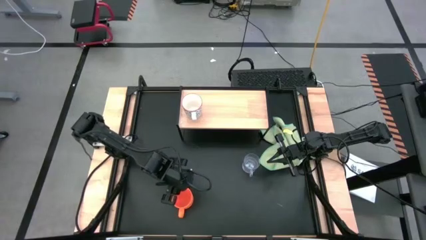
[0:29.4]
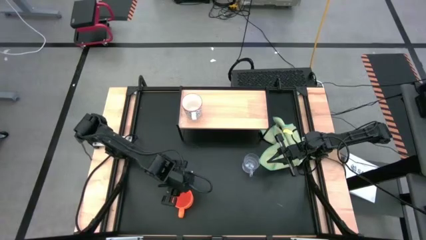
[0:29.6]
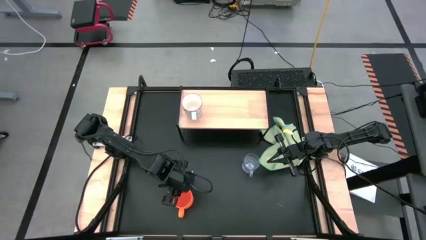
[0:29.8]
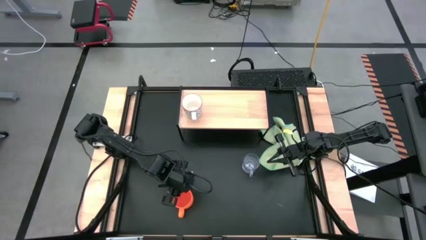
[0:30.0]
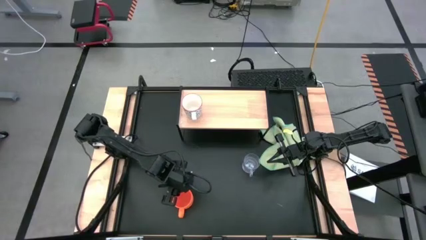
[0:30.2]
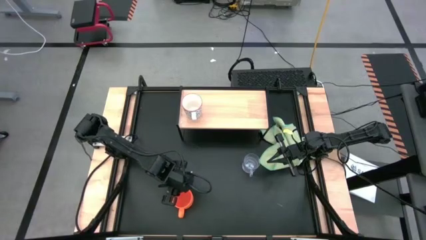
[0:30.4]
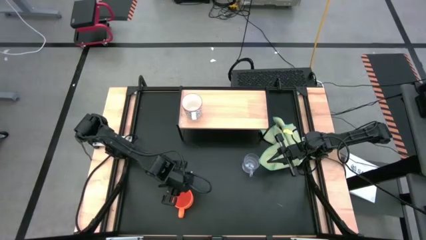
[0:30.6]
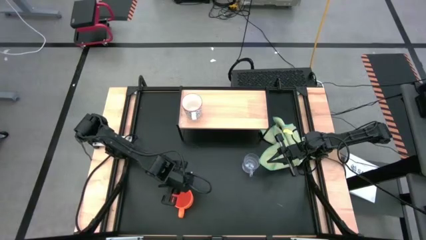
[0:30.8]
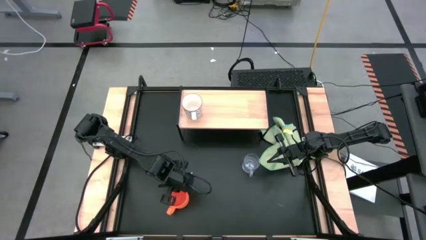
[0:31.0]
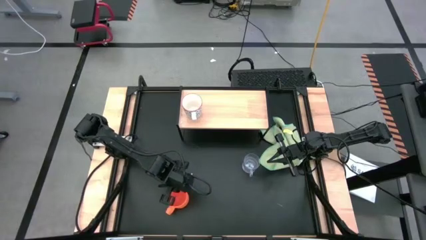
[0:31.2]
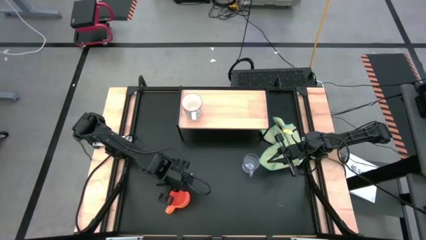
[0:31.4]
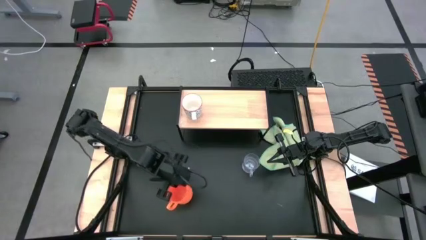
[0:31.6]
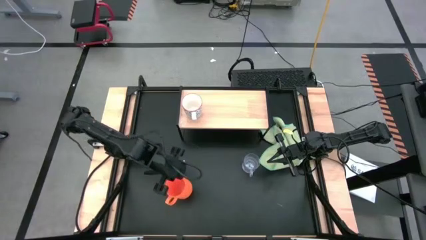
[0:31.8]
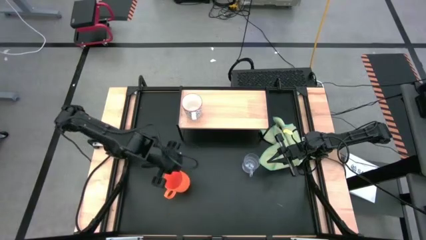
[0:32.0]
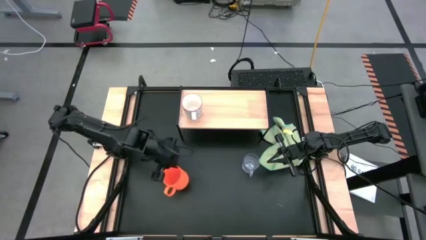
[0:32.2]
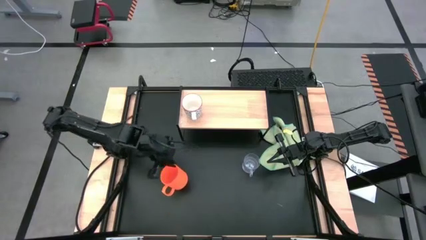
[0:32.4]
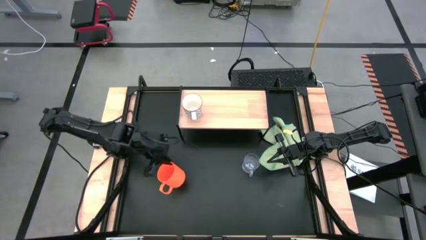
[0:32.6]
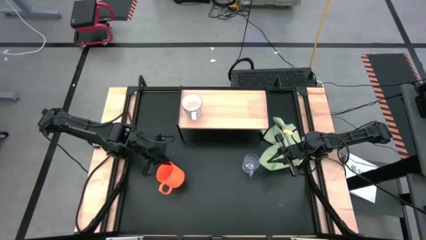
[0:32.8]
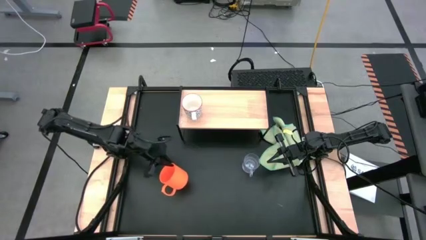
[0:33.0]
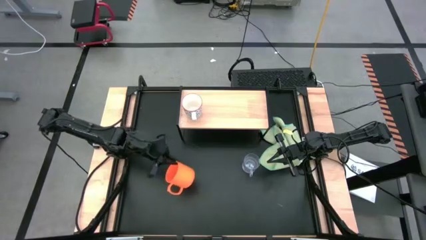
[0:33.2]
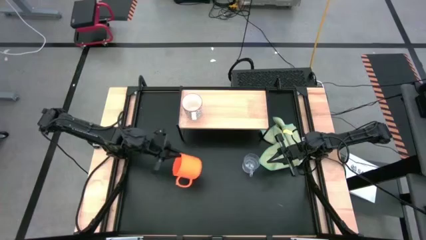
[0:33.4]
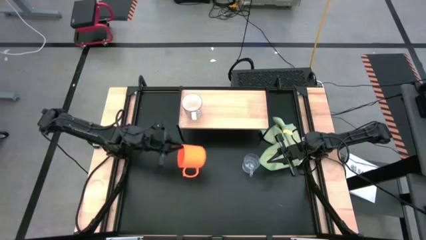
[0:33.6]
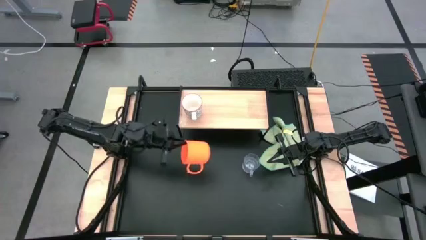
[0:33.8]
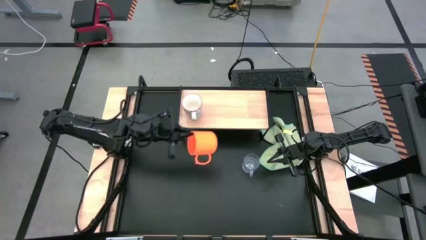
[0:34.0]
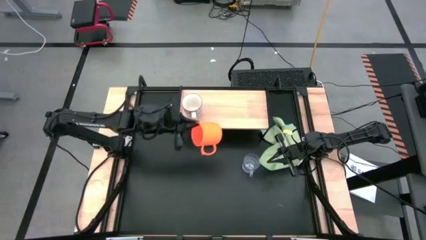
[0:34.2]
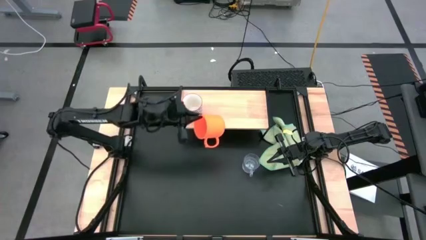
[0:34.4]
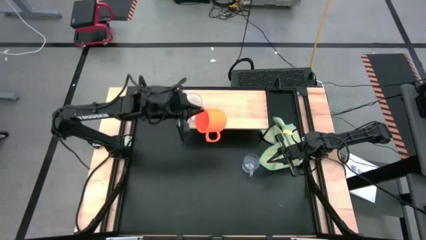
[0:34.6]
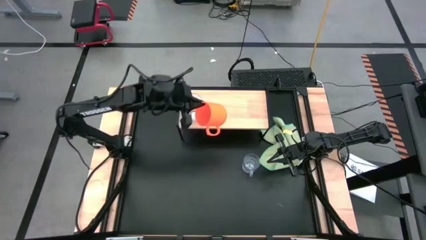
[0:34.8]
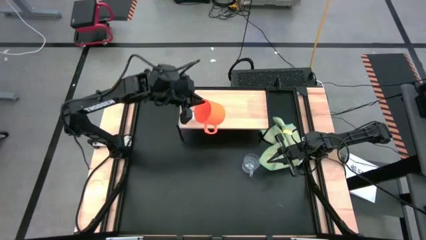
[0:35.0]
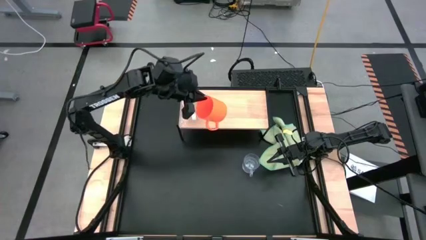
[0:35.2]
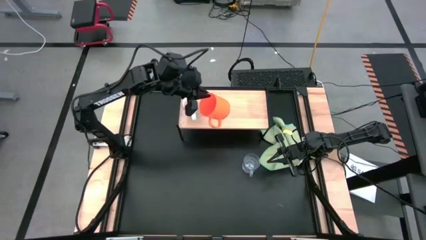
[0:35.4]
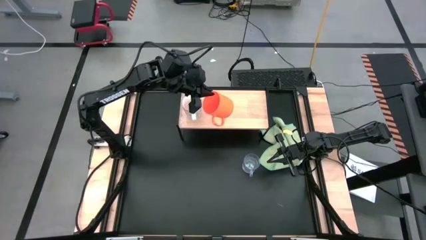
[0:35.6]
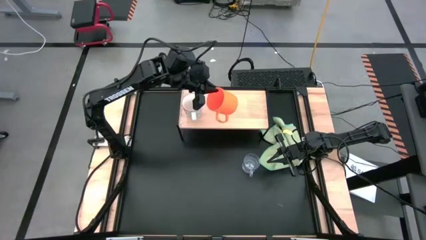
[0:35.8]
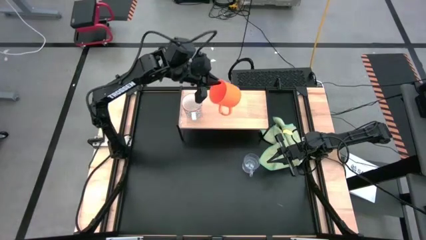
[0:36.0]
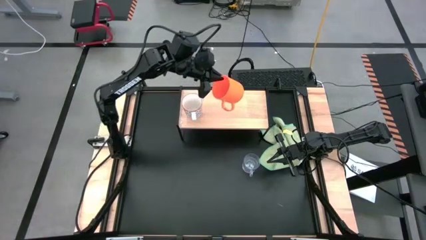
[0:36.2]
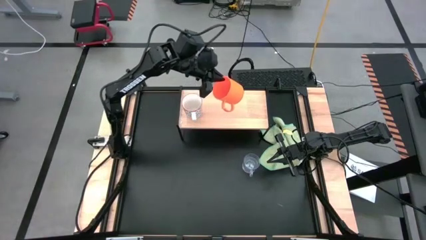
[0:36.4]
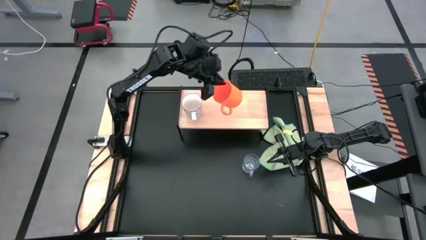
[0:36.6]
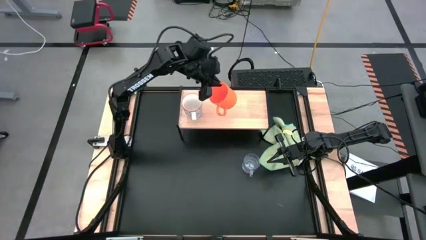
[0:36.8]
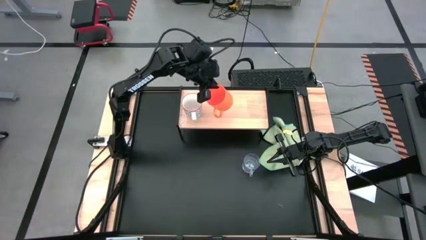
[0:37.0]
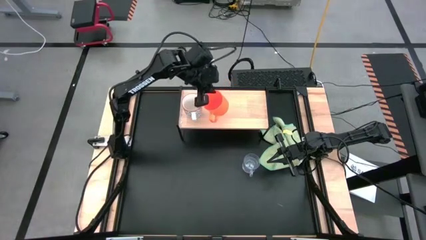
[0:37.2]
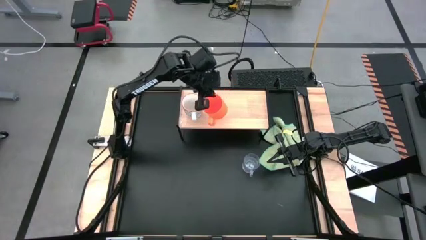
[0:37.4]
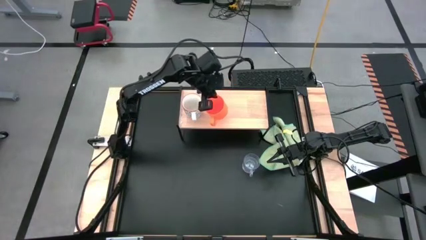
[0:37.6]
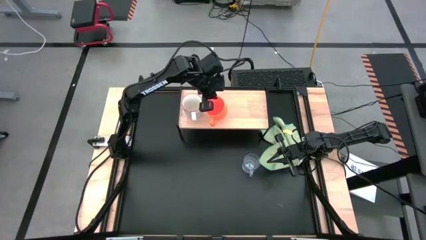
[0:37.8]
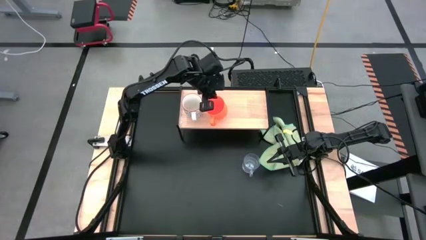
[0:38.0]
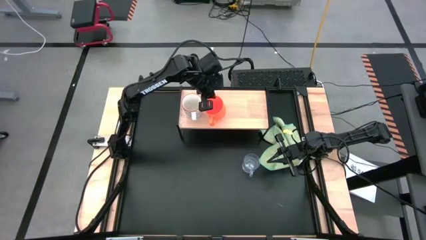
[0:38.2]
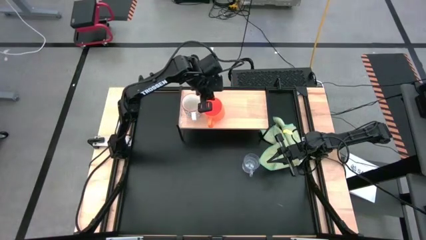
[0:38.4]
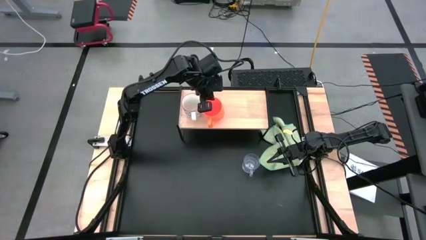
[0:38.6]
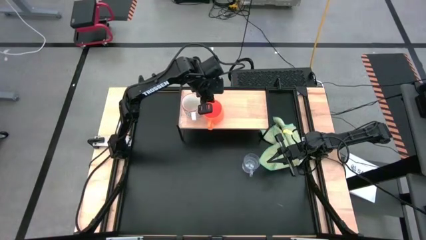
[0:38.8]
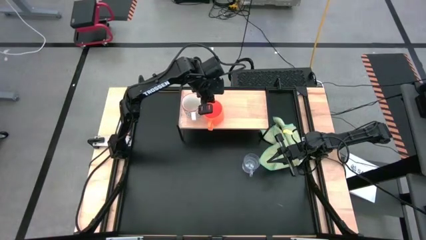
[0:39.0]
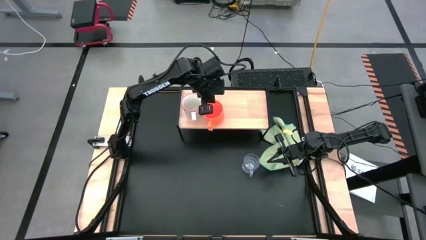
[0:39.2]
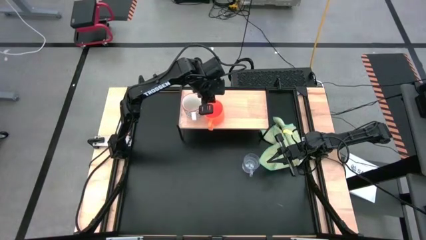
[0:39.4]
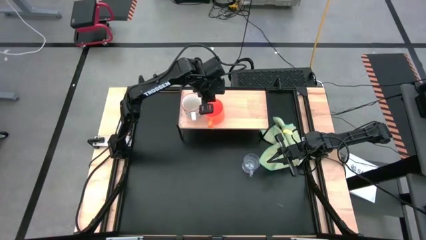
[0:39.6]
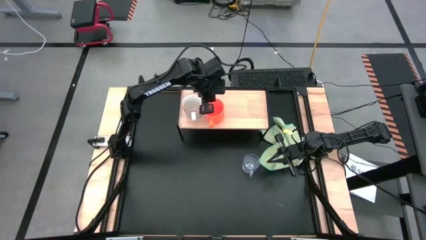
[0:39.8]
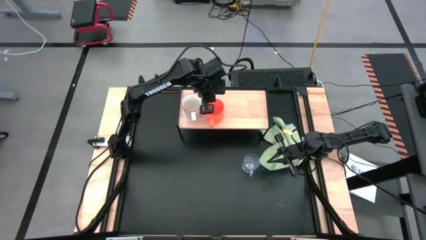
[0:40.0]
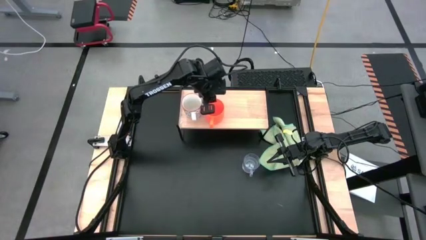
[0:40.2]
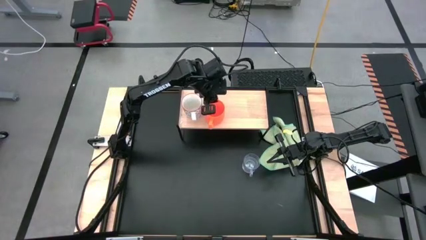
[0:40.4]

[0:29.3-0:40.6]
Task: Stack small to large cups/mugs on shelf
Put the orange cup on the shelf

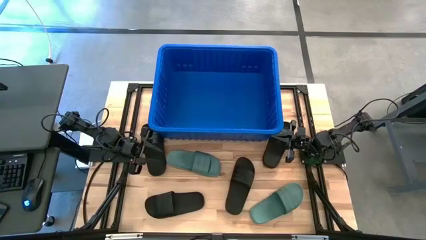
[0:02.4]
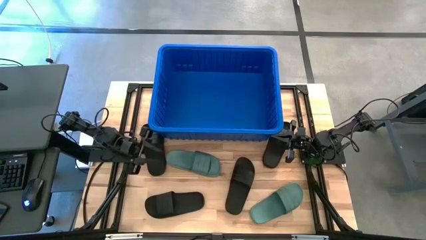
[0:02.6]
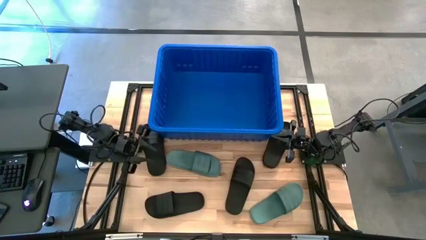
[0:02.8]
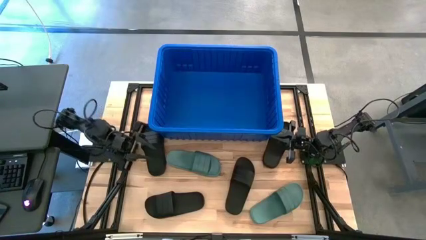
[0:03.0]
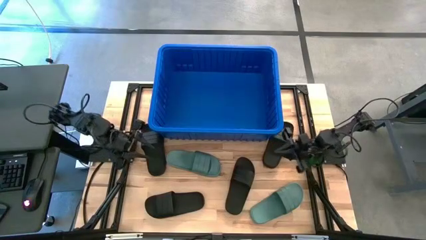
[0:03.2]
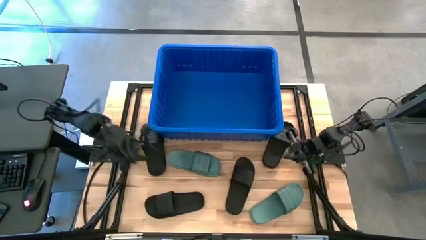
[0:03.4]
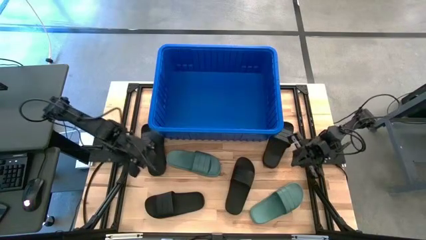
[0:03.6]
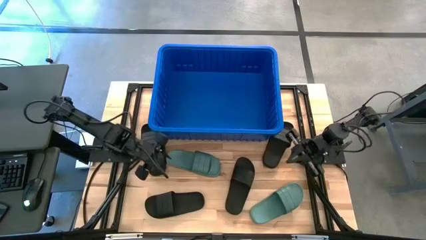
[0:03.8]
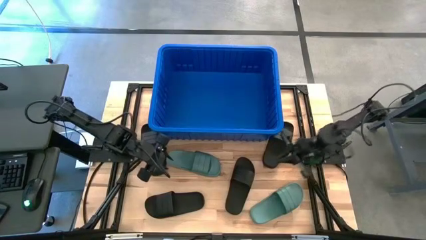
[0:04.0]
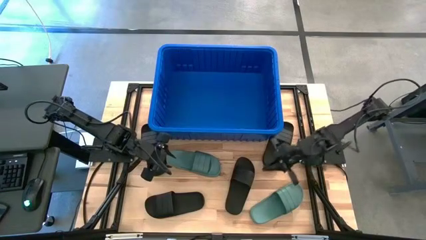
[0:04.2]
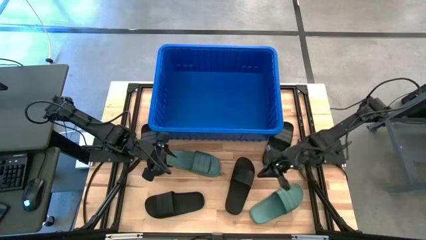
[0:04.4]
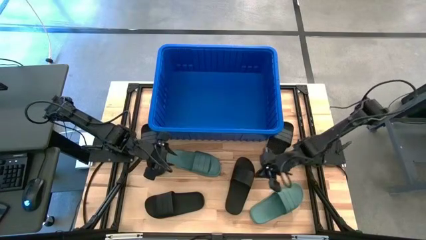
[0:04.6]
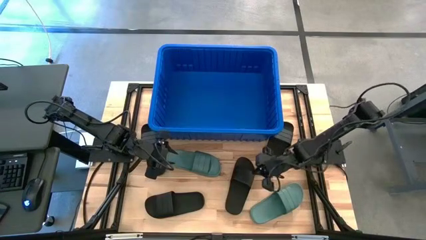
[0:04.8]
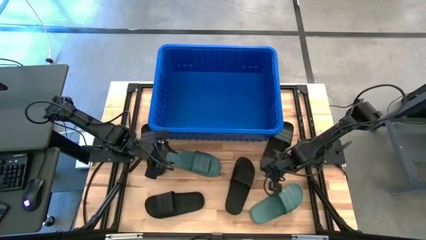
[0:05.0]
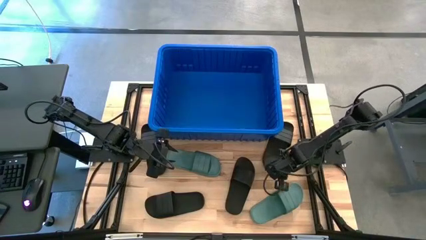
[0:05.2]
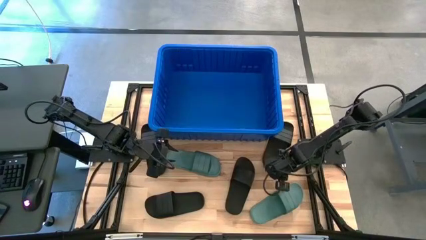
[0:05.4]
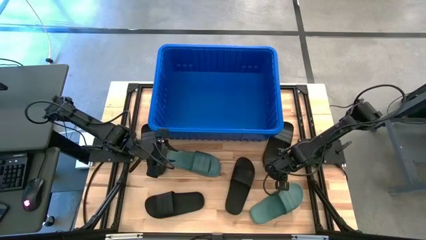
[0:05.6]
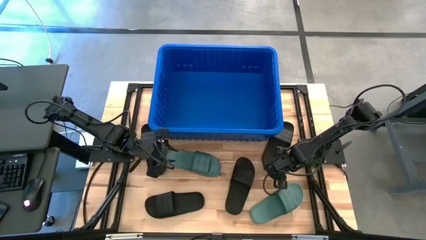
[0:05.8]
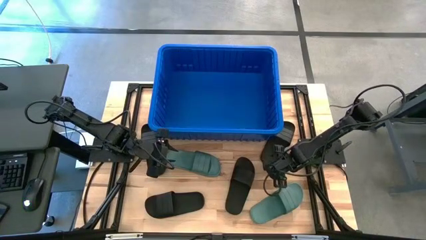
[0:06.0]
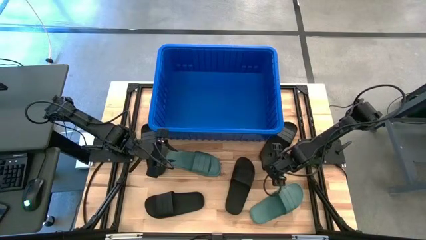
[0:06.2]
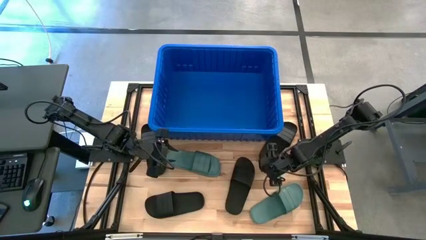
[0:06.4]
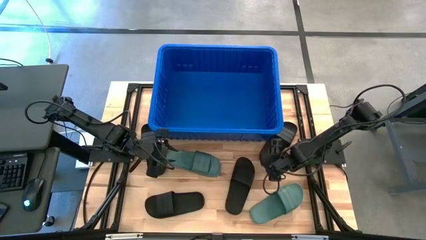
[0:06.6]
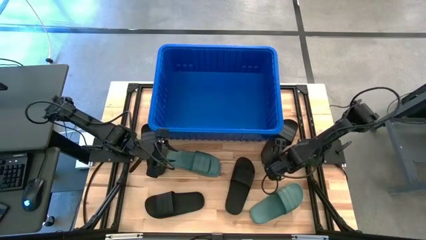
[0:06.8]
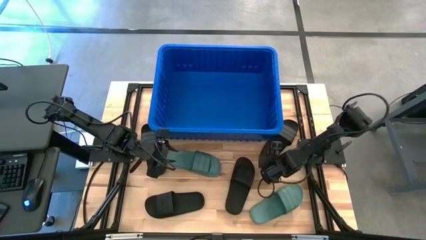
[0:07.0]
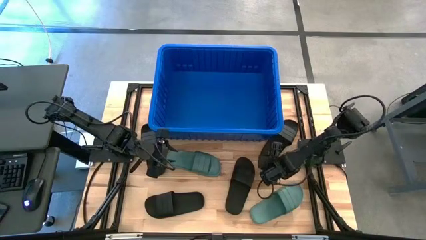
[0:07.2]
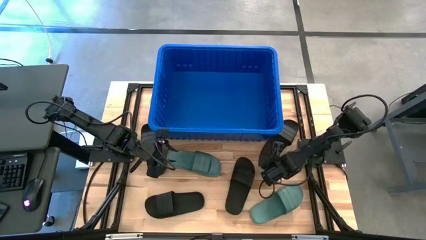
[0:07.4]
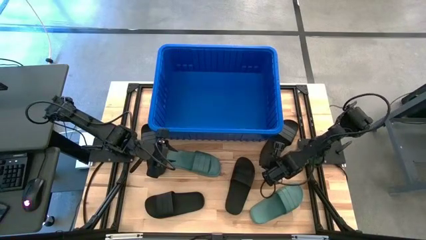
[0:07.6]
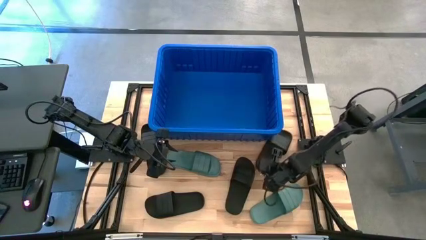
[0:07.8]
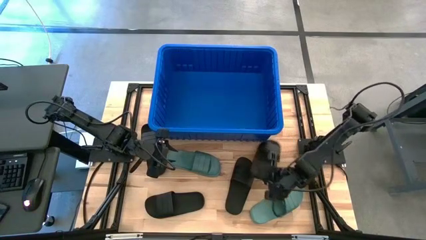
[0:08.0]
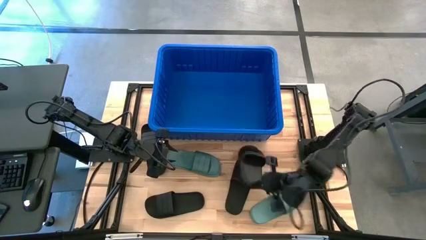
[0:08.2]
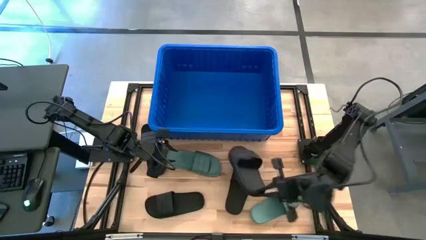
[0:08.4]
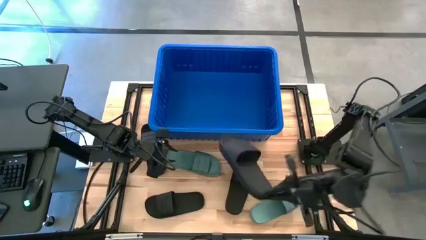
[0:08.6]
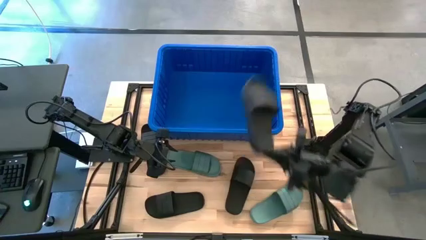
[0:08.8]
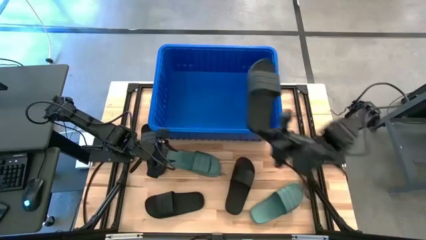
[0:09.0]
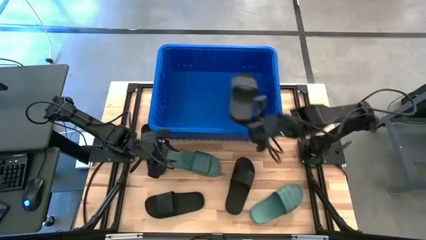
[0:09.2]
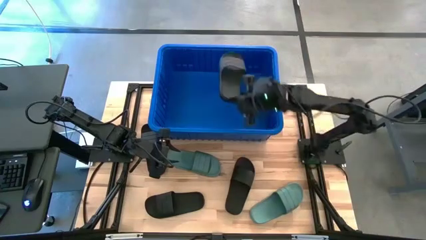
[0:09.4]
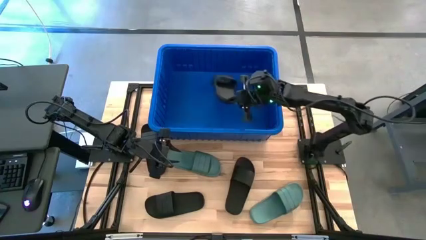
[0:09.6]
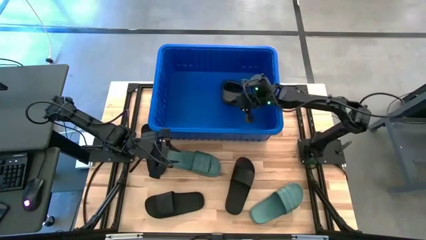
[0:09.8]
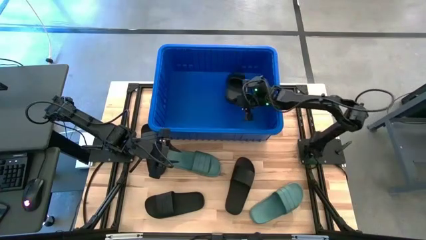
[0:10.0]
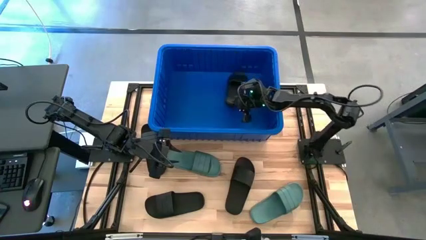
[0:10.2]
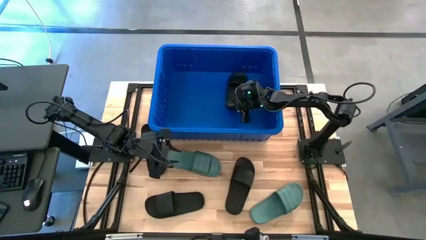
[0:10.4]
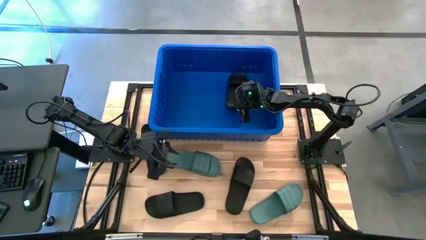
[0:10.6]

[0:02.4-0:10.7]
Task: Pick and place slides into bin
Put the black slipper into the blue bin
